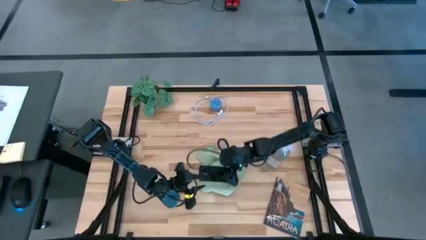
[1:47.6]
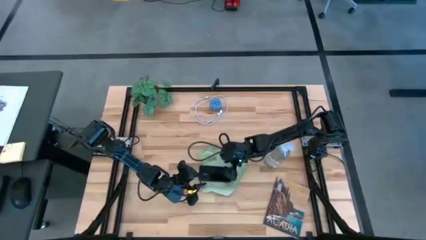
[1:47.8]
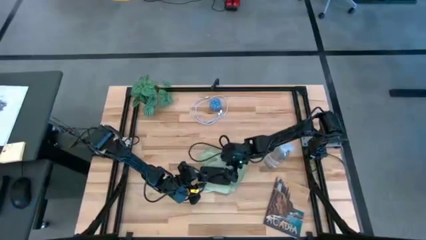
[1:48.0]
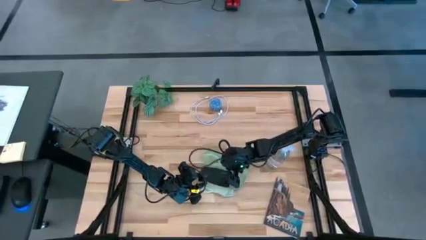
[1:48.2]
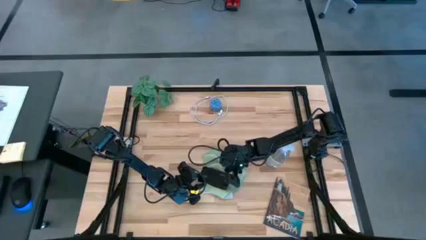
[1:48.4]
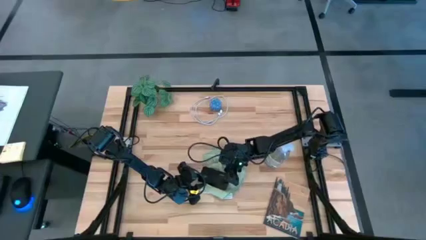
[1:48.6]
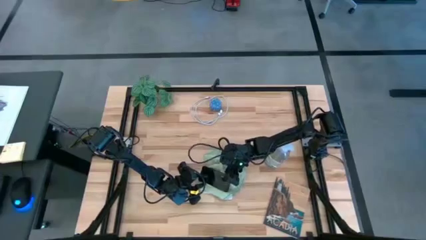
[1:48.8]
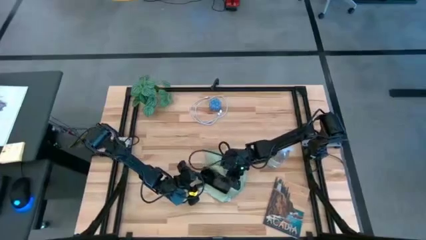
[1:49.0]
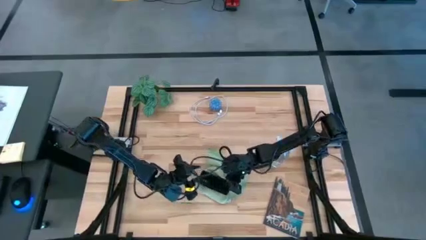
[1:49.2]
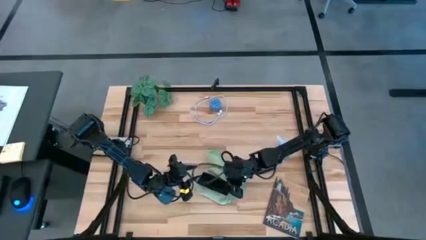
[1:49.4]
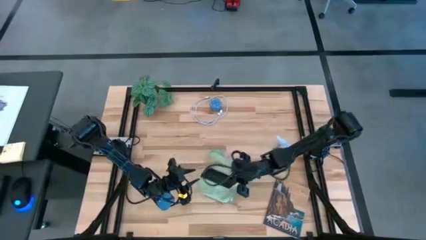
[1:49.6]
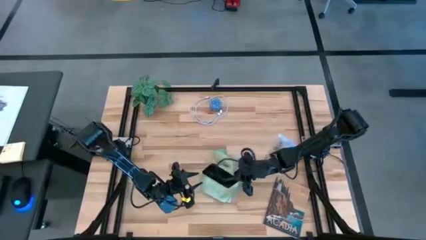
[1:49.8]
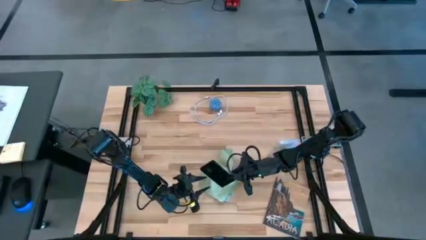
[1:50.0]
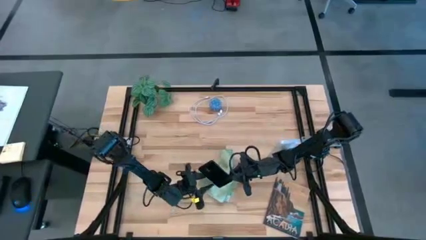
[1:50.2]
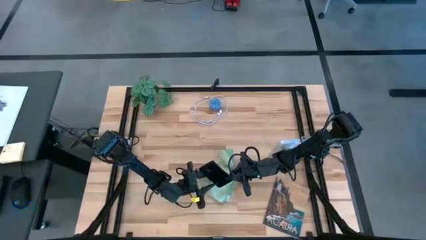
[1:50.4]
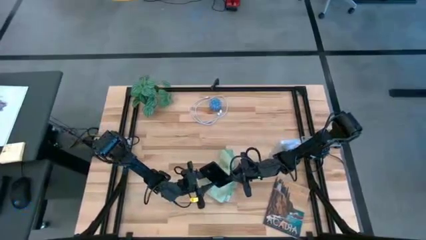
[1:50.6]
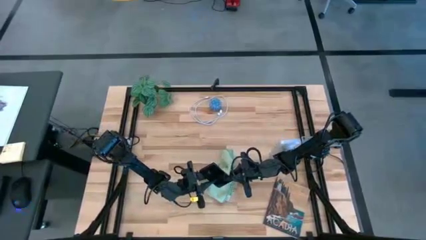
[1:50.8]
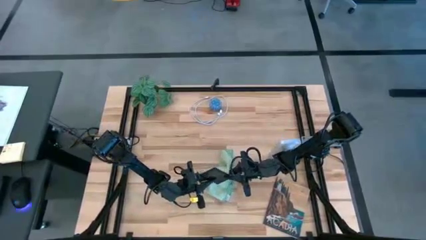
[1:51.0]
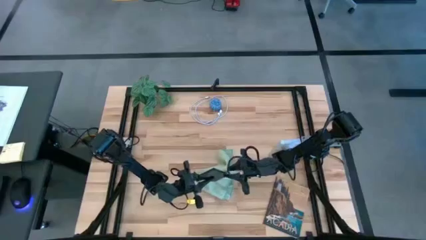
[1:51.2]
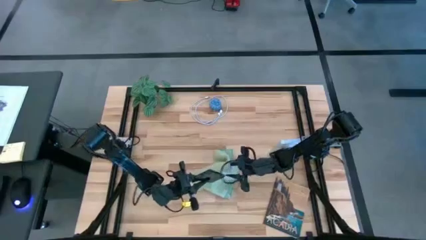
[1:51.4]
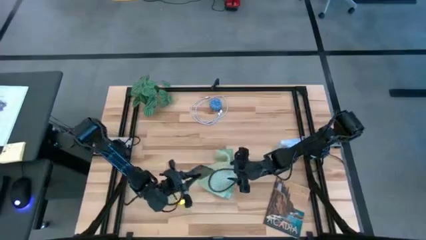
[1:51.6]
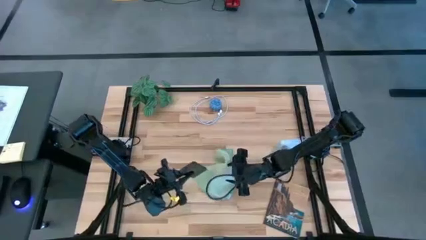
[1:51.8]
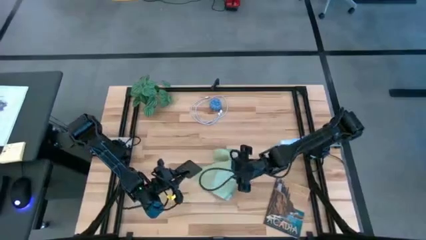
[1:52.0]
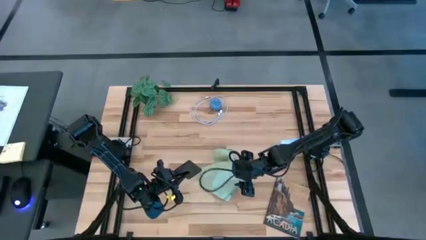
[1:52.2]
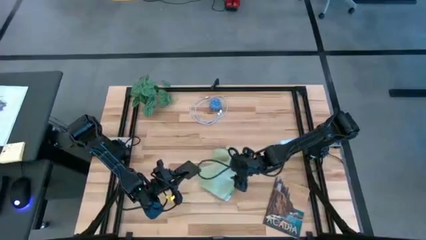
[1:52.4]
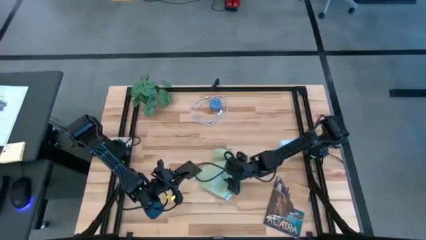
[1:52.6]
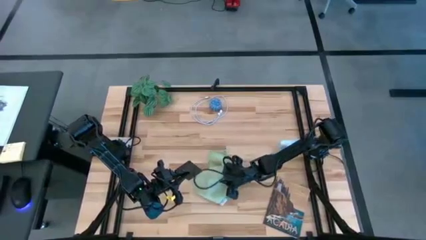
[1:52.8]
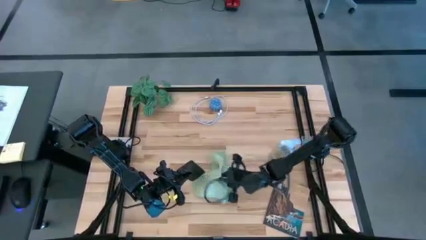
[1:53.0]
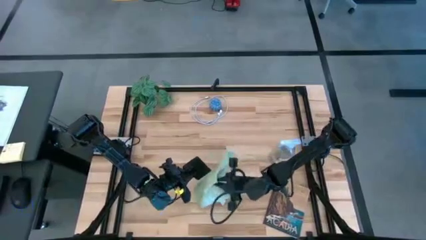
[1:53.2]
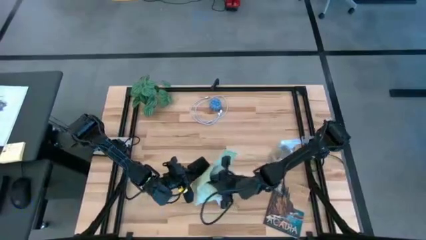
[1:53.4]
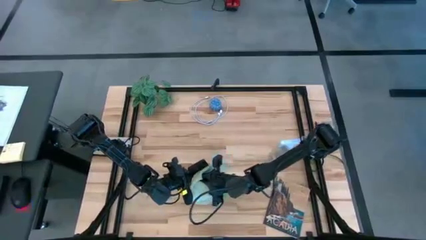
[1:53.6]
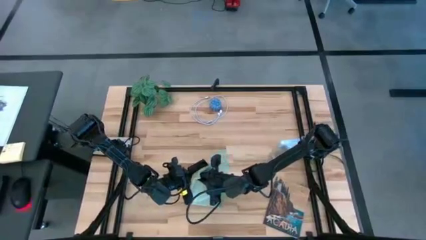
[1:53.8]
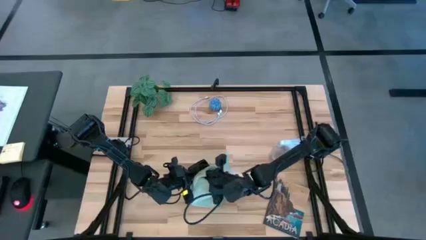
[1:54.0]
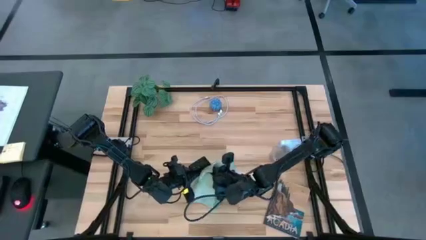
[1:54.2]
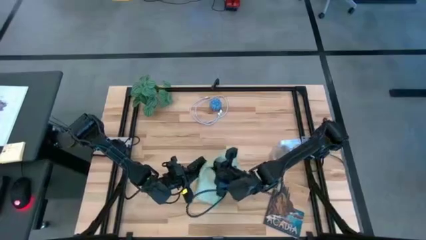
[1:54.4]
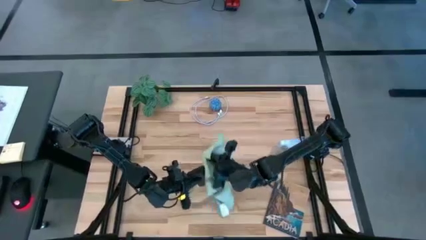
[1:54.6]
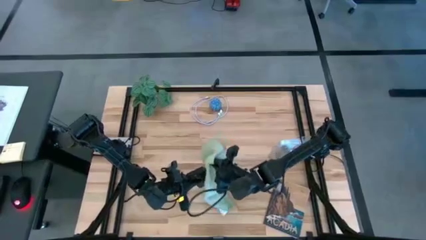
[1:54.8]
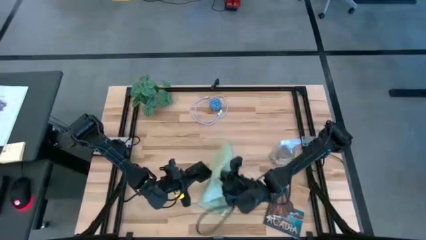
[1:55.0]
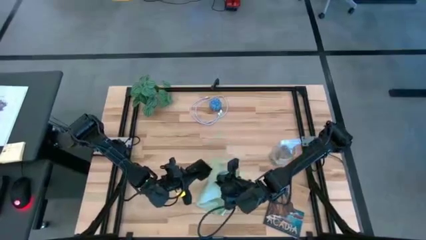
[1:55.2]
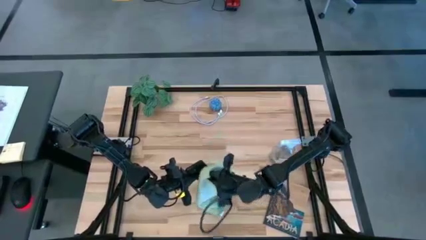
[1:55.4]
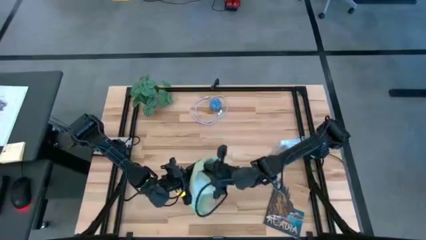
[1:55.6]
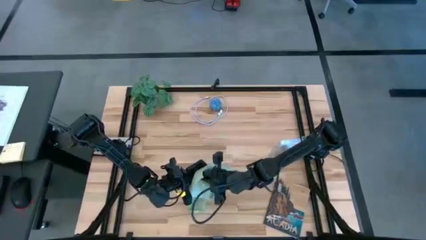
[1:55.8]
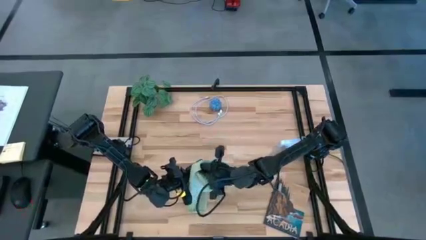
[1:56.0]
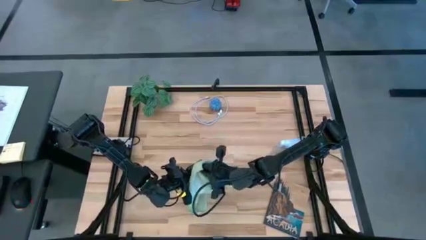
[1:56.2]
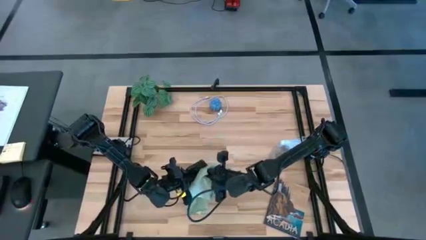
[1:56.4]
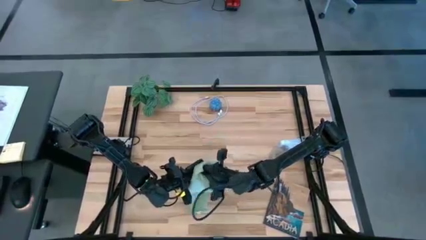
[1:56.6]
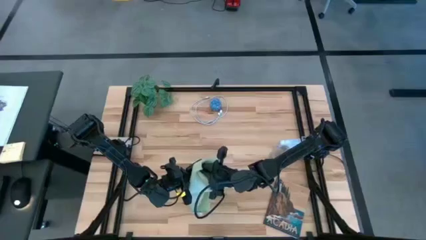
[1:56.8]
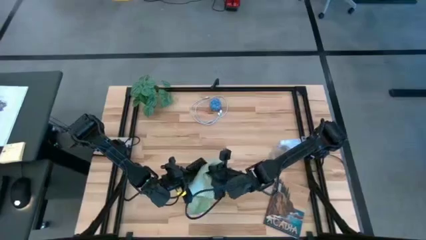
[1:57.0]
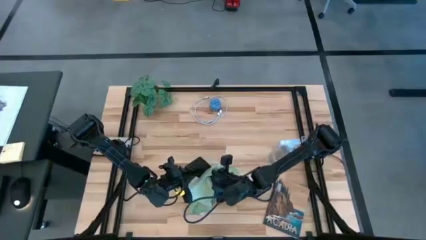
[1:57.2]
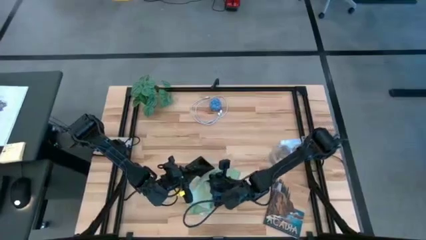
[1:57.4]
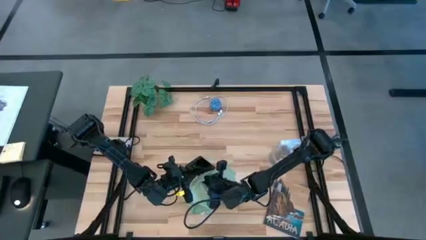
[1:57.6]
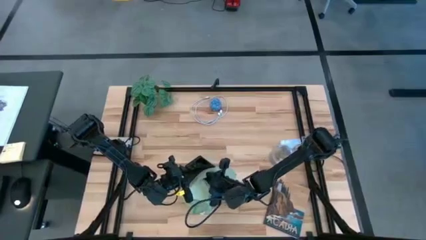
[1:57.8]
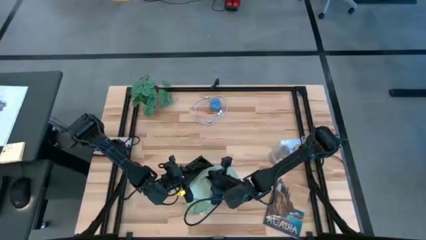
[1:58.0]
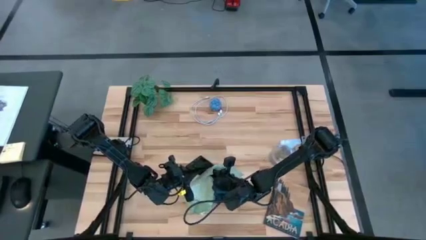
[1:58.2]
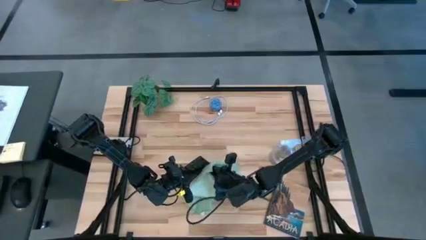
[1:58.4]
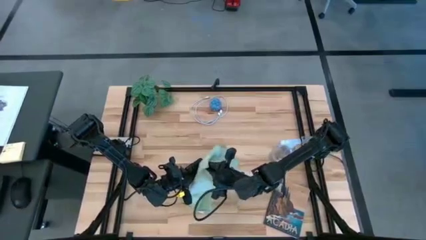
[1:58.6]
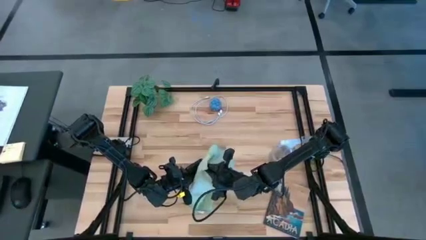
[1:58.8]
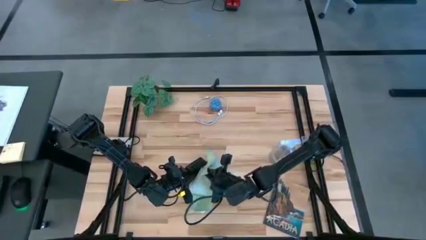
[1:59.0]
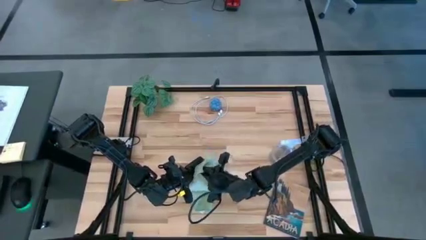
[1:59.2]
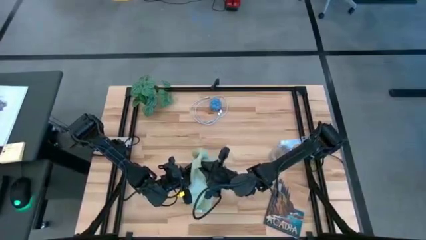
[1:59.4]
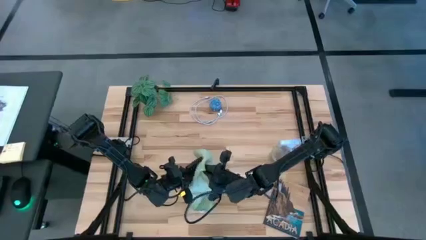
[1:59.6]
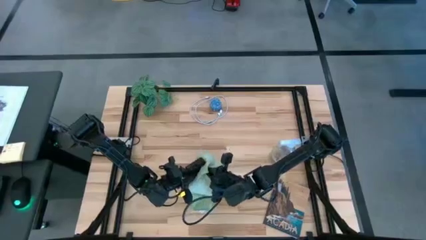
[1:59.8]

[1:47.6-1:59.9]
Task: Apply microfiber cloth
Wipe the back of the phone with the light green microfiber cloth
